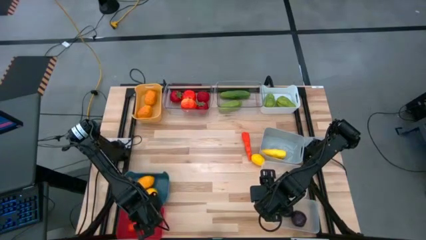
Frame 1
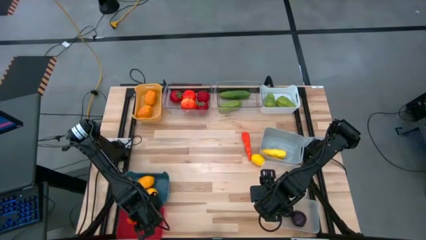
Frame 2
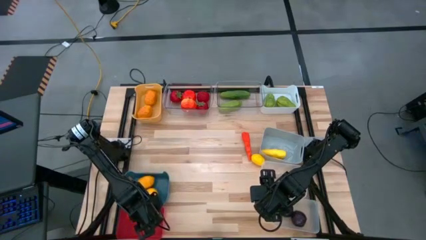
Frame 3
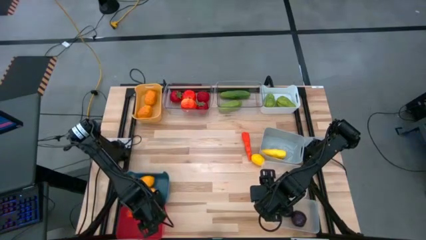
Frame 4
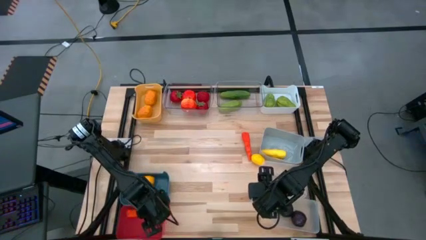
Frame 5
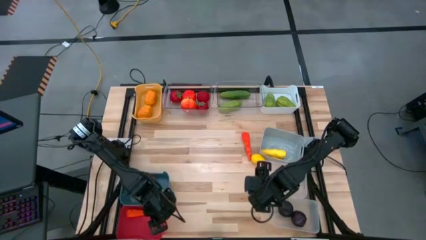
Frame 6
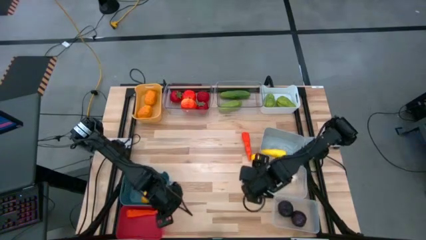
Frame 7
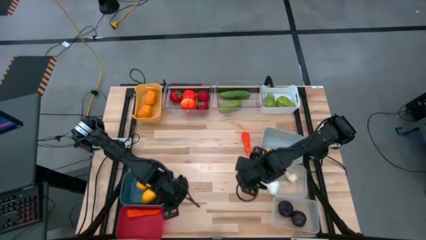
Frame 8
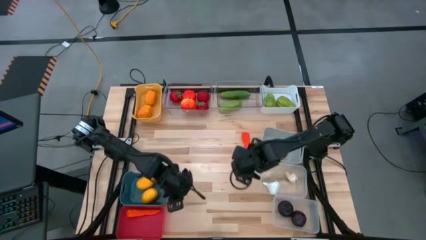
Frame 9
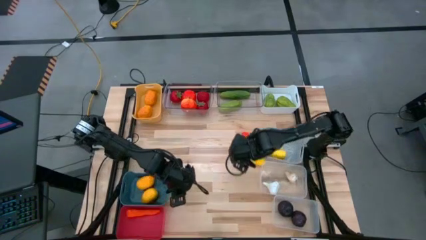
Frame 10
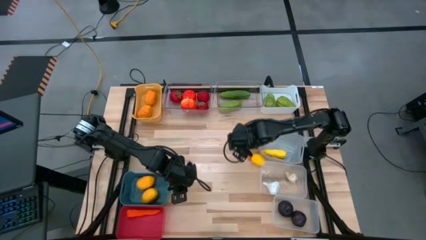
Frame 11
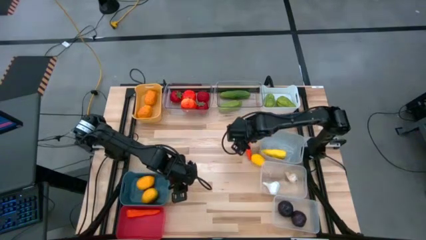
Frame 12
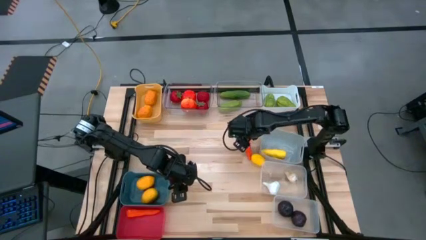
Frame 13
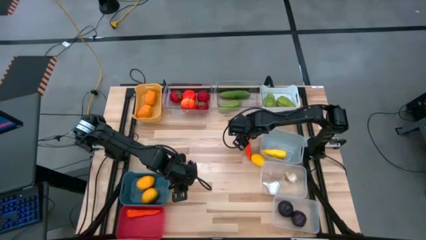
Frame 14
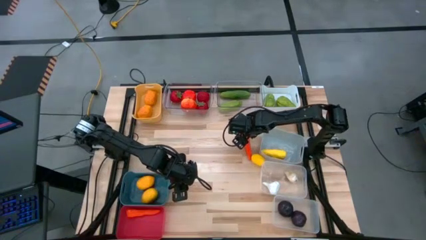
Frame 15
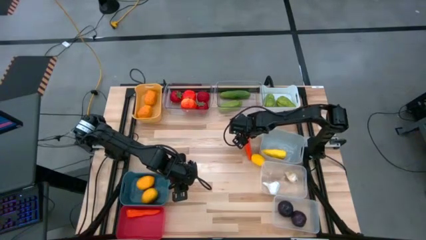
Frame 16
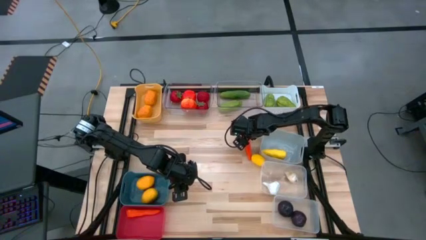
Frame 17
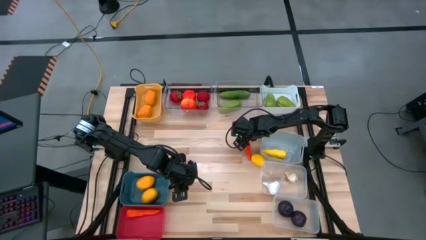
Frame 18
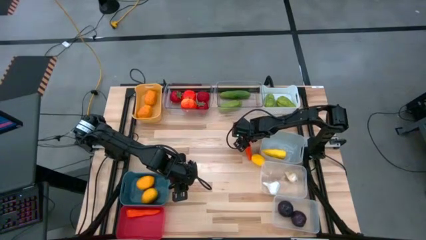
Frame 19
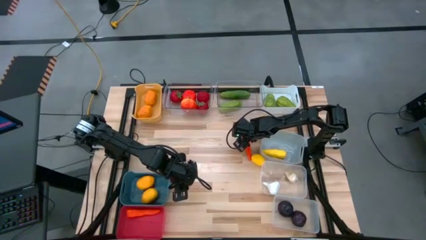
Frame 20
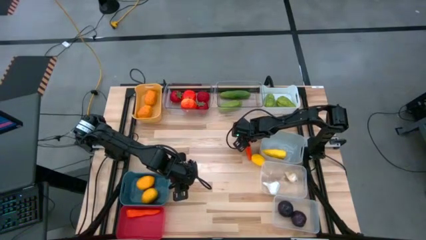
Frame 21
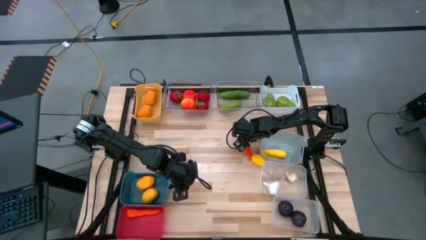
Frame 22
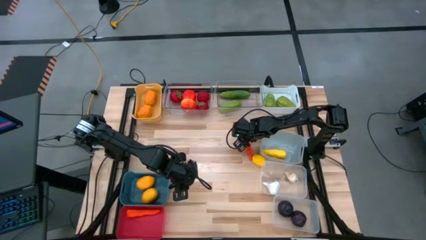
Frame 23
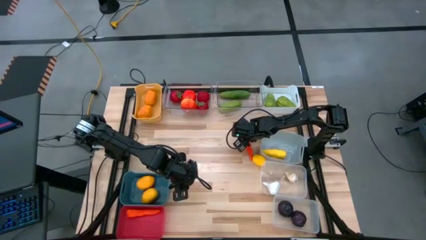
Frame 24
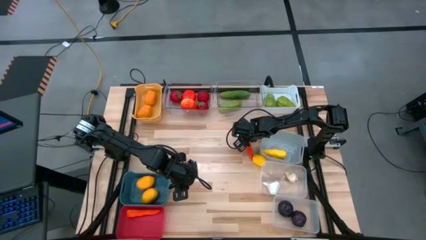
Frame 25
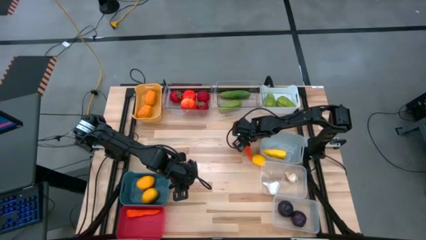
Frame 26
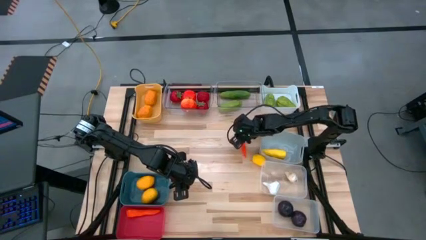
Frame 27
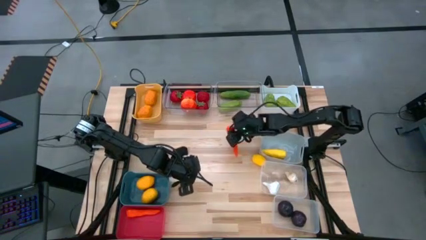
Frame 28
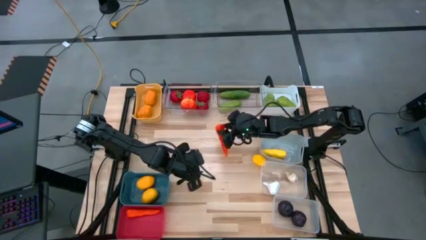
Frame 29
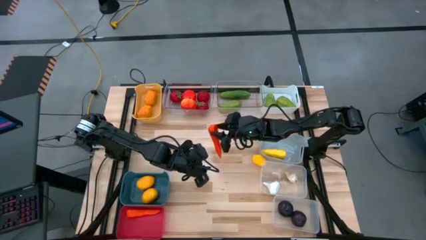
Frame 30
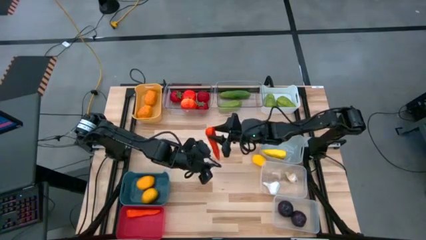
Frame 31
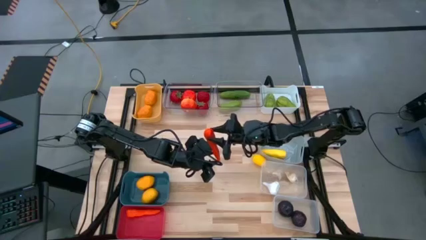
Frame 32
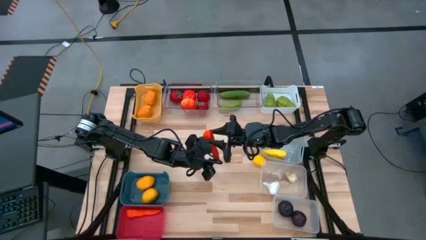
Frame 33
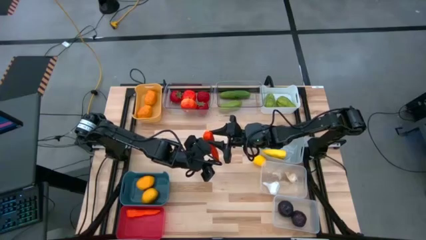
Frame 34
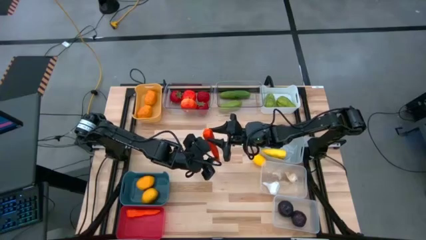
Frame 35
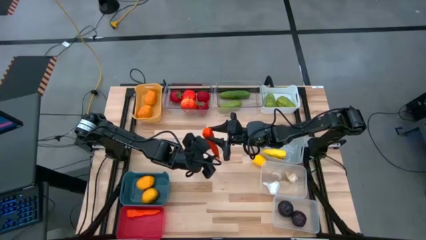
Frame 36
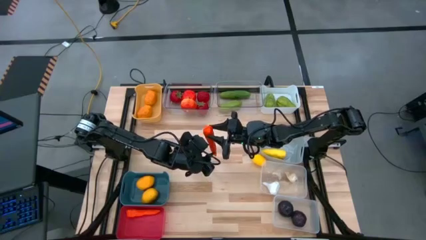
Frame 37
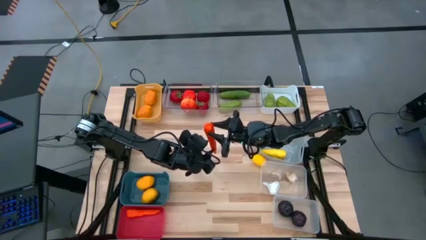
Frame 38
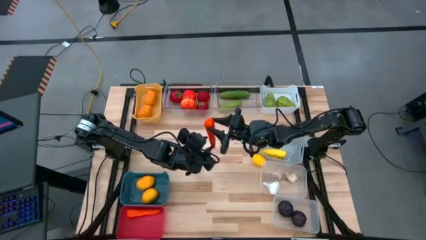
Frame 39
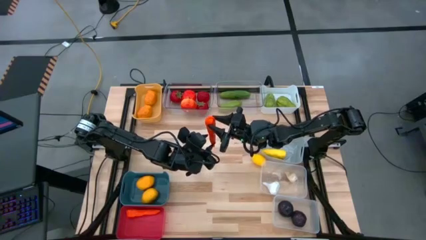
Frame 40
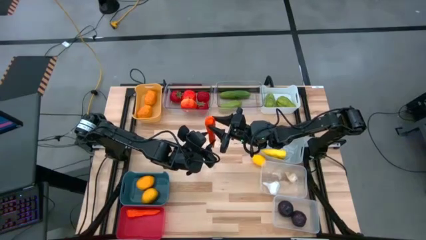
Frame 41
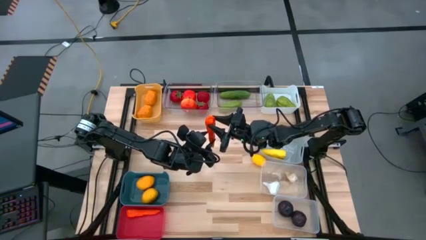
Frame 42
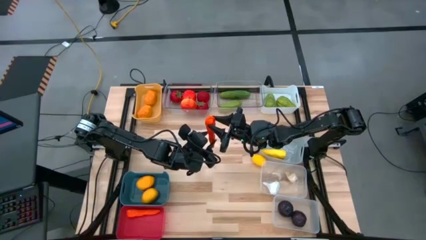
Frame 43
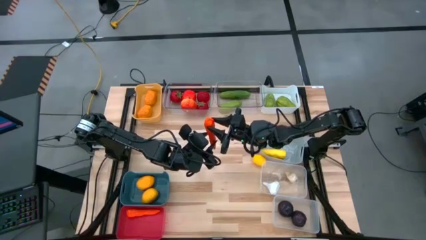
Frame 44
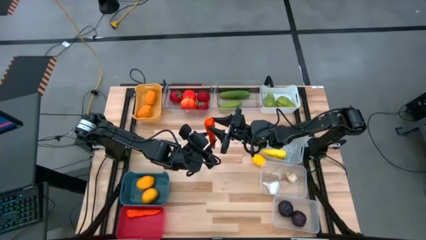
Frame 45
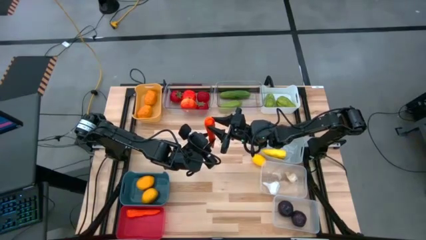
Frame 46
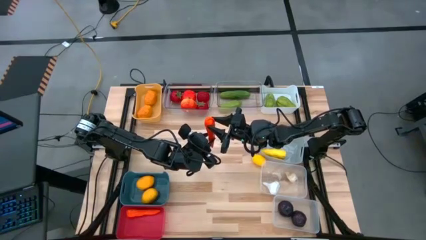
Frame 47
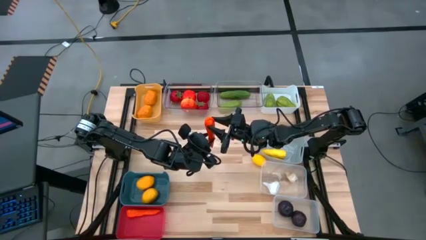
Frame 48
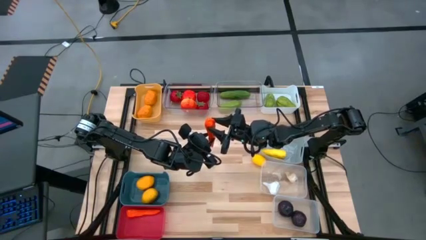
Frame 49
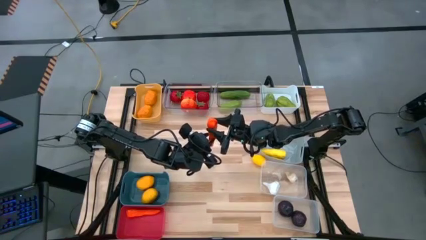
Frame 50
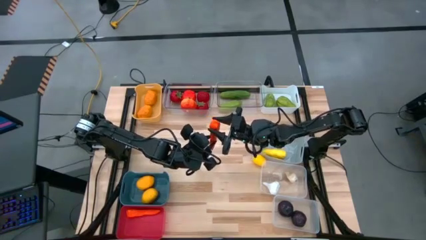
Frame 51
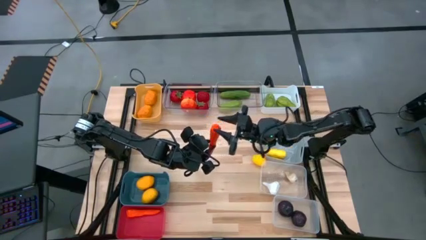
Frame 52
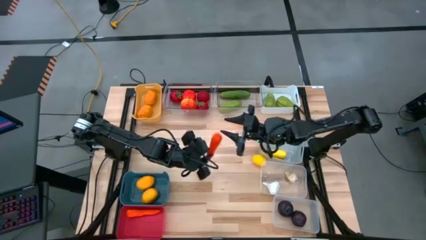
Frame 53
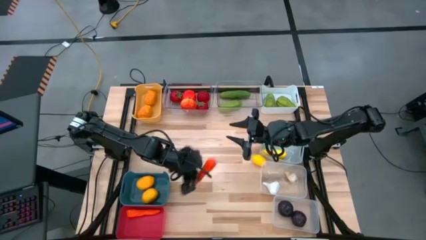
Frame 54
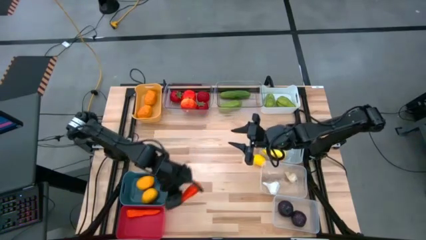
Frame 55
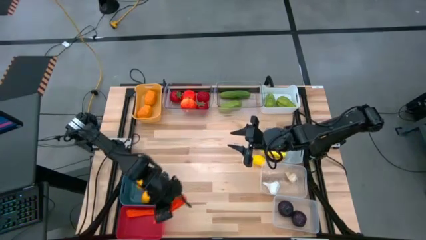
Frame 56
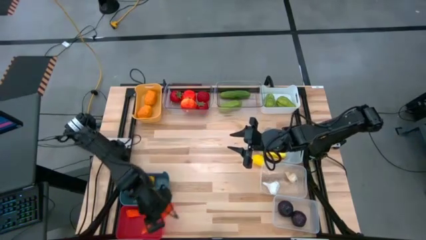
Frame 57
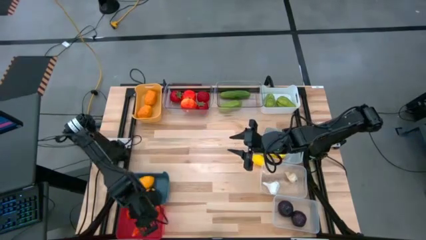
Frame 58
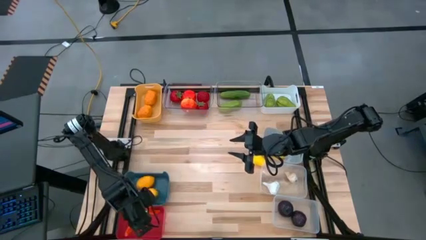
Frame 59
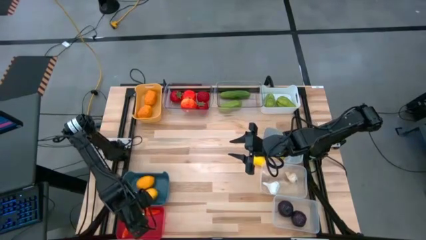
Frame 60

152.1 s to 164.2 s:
Task: Sort produce into baskets
Put the orange carrot into the red bin
